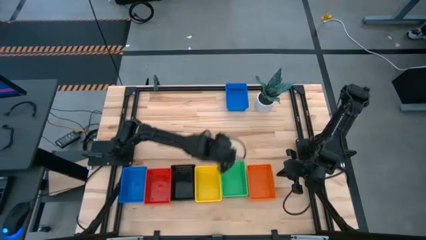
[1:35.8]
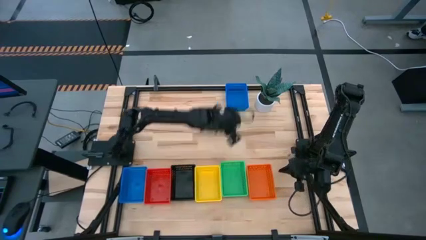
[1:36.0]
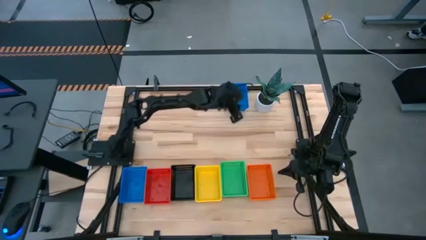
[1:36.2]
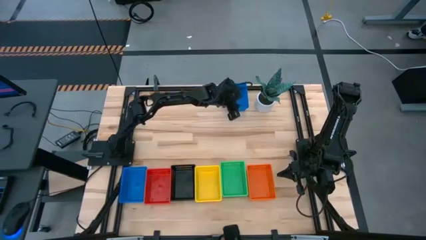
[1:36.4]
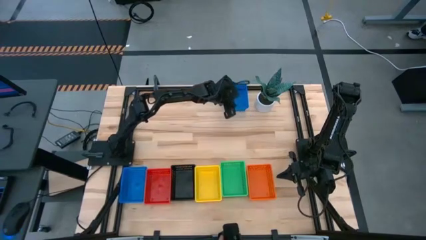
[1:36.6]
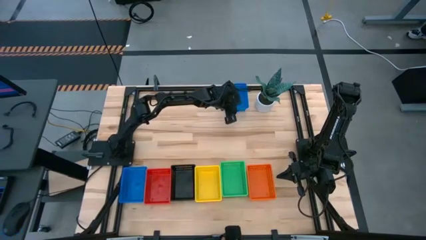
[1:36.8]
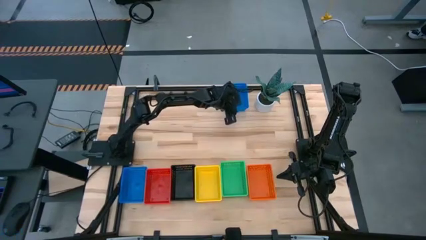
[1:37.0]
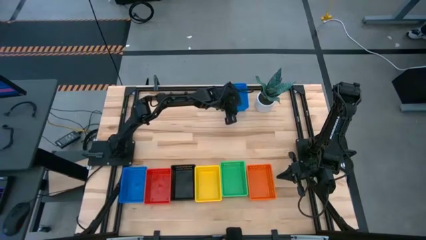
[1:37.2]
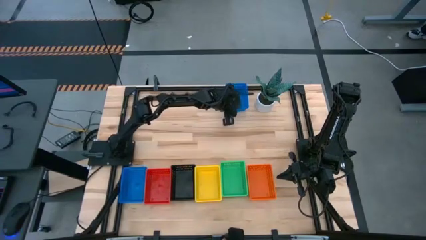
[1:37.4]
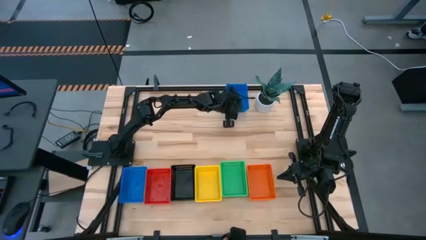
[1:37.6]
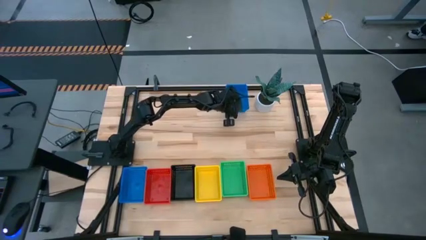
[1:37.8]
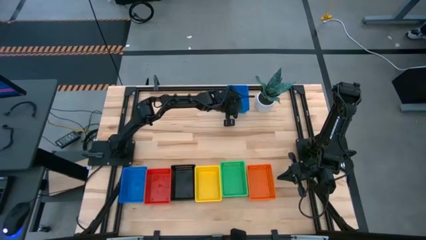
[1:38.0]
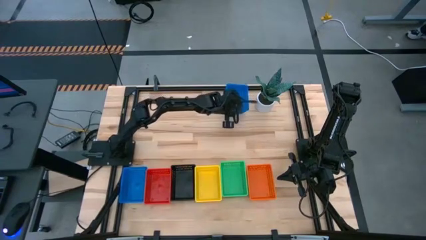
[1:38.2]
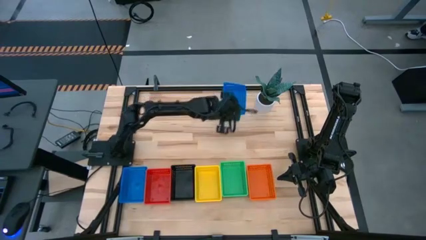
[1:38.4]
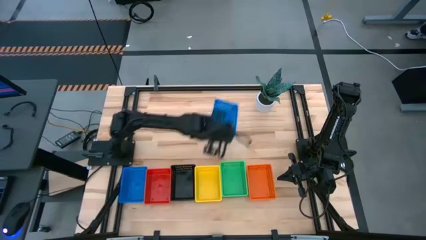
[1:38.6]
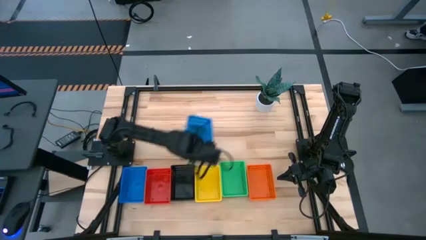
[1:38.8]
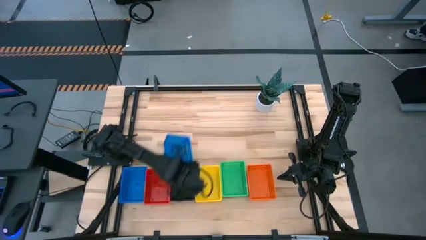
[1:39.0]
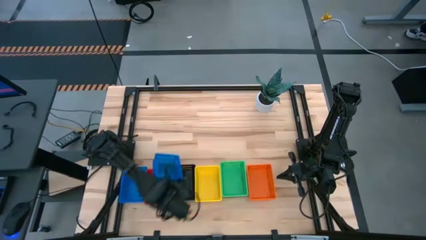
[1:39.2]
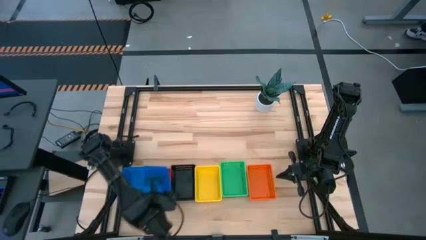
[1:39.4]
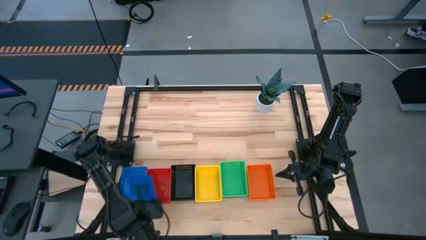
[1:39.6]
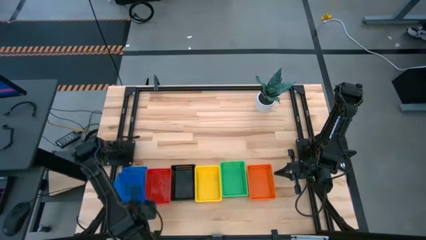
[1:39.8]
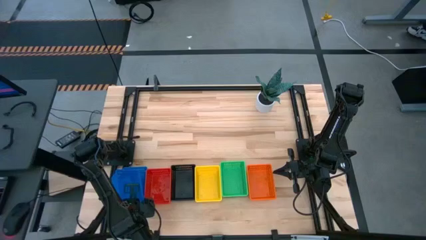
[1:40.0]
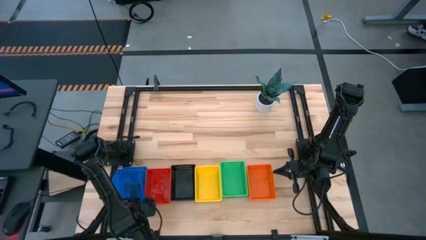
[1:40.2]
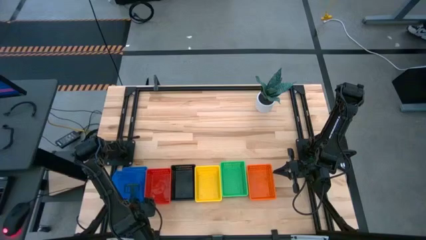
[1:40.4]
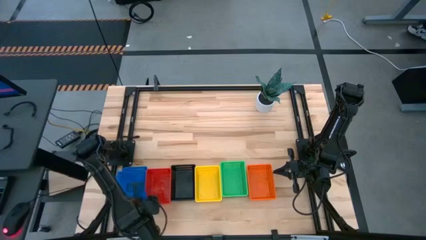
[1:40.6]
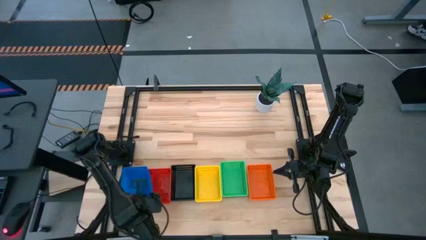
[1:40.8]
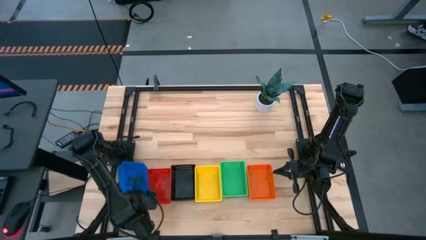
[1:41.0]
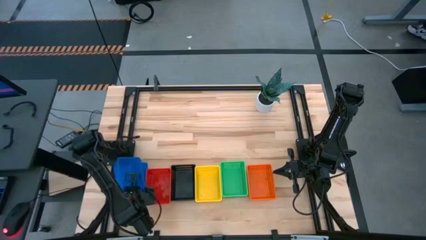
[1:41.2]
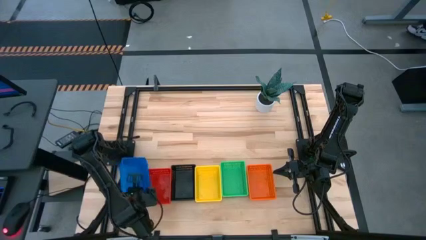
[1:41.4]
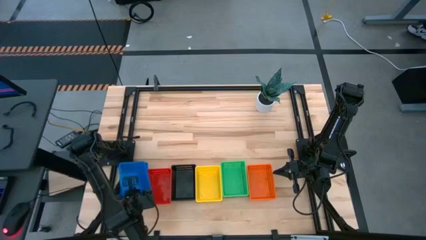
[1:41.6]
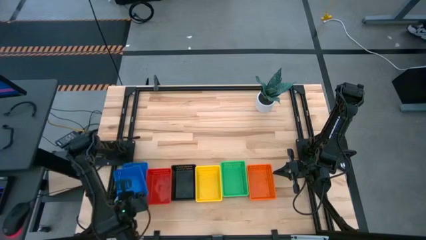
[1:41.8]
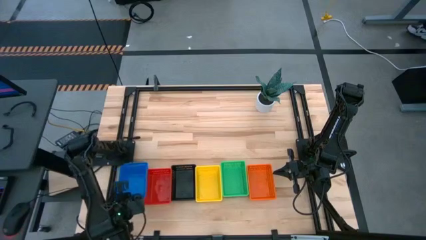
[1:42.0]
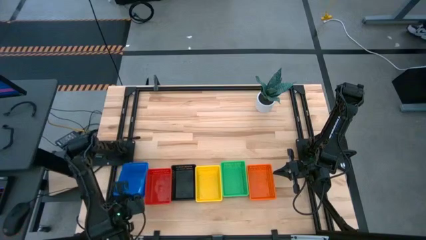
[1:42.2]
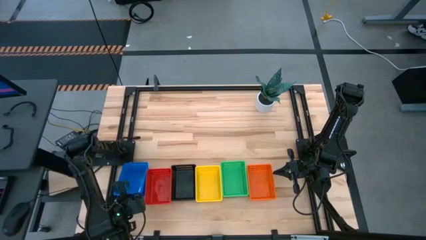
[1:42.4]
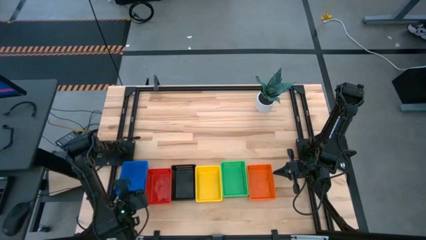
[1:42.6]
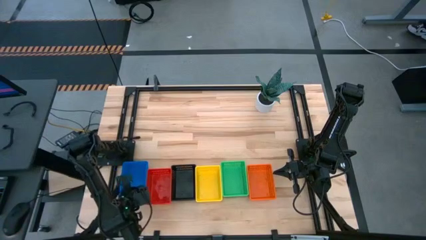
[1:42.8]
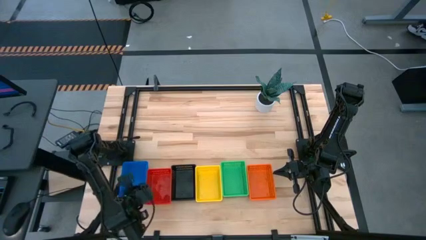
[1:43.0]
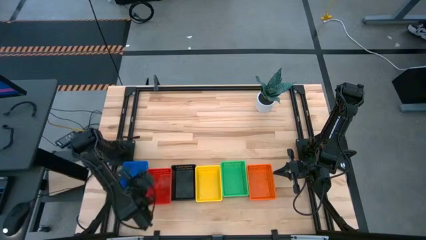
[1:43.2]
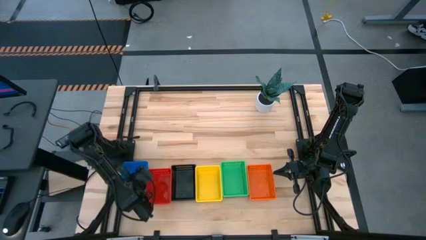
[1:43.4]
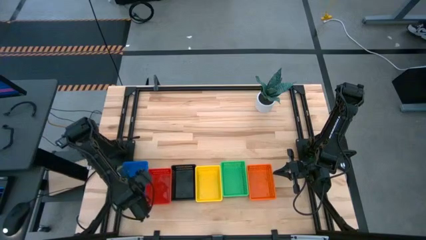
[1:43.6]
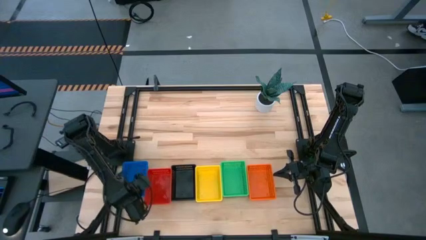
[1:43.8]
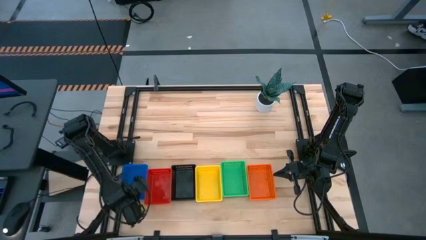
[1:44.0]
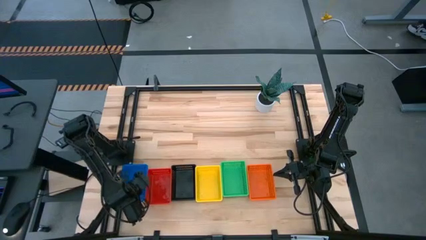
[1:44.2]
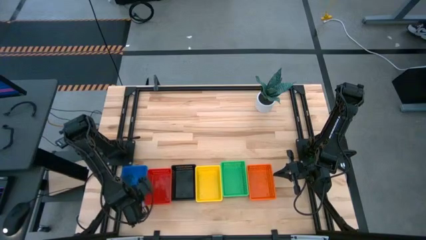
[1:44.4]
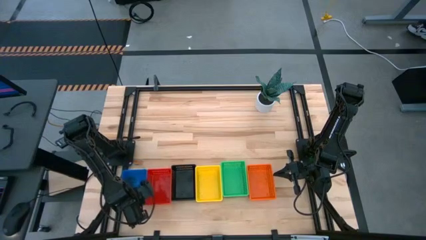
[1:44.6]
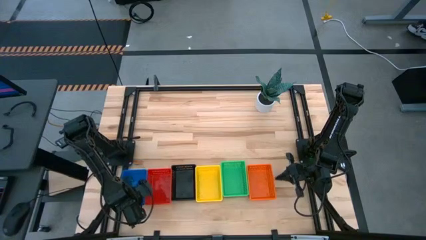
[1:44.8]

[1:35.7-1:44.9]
Stack the top blue bin on top of the left blue bin

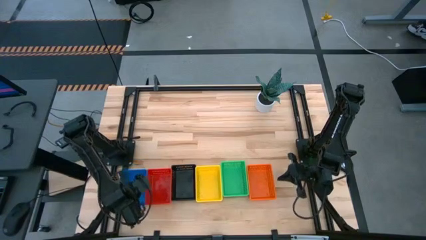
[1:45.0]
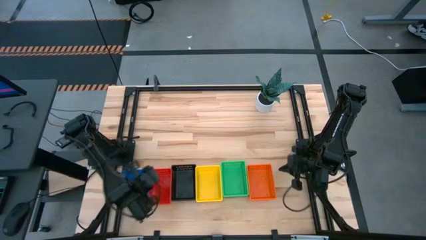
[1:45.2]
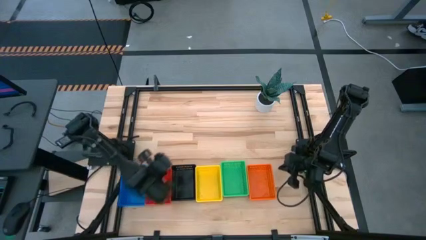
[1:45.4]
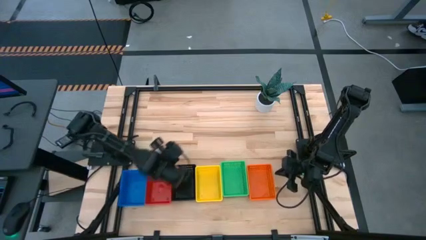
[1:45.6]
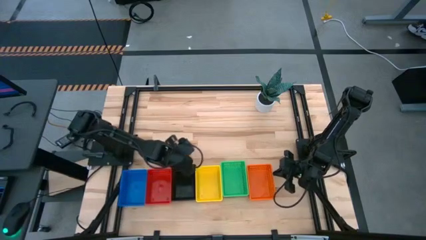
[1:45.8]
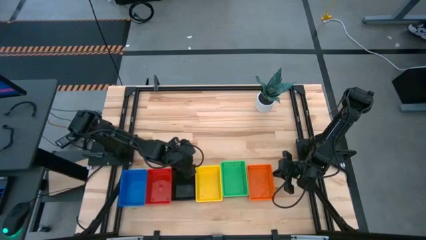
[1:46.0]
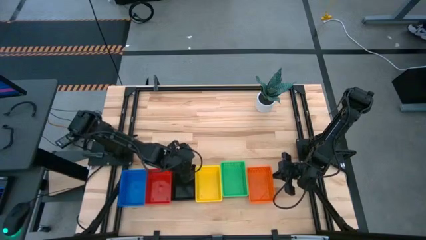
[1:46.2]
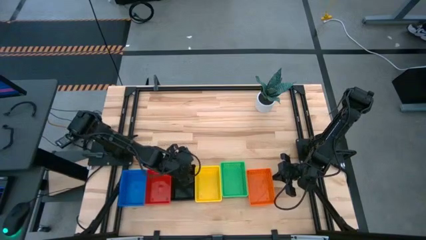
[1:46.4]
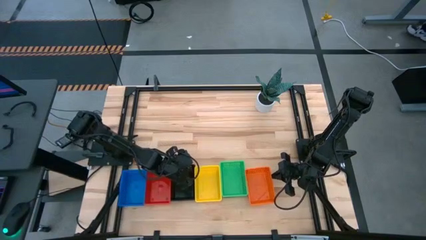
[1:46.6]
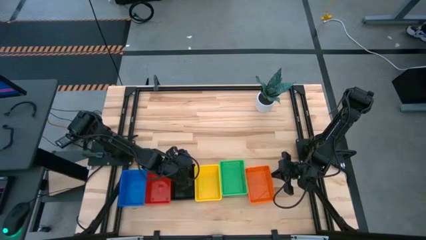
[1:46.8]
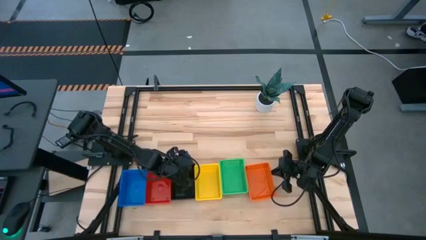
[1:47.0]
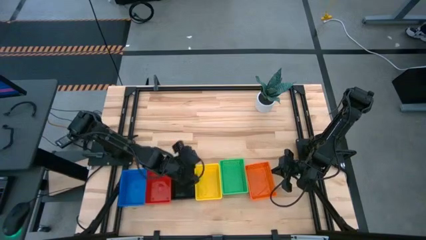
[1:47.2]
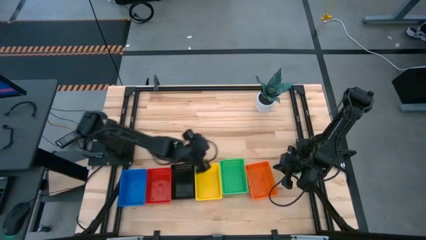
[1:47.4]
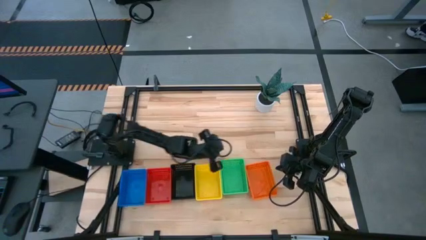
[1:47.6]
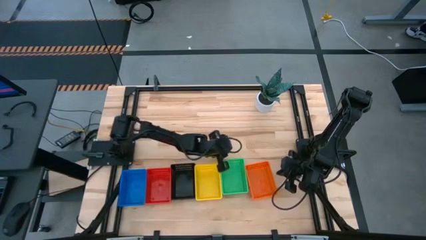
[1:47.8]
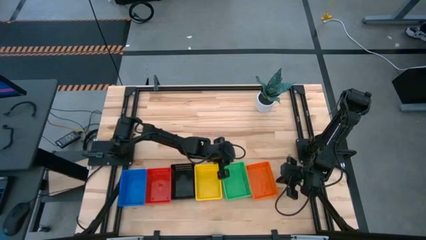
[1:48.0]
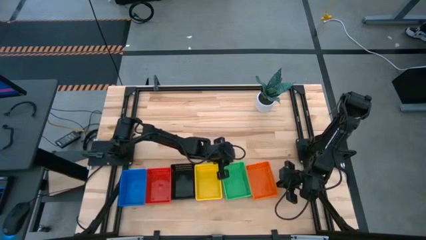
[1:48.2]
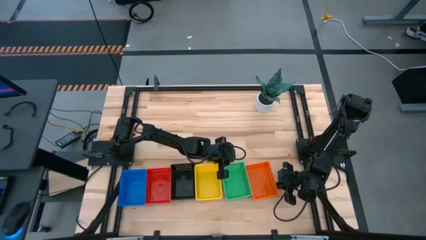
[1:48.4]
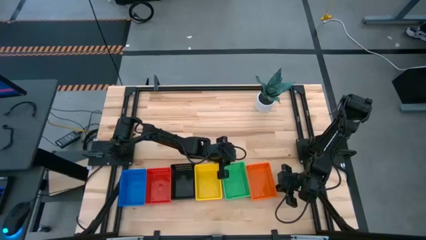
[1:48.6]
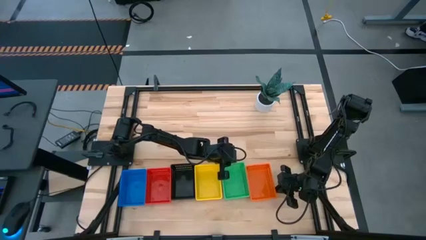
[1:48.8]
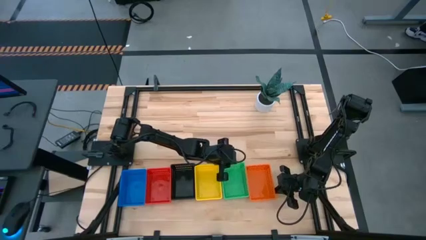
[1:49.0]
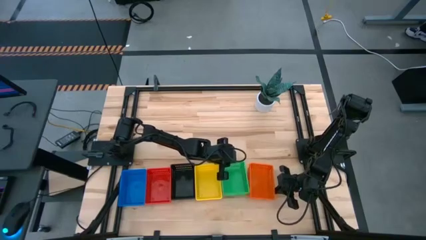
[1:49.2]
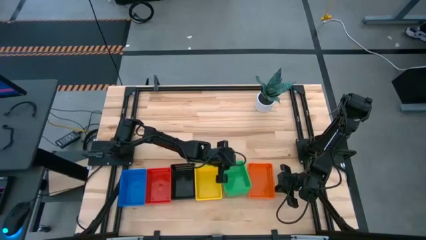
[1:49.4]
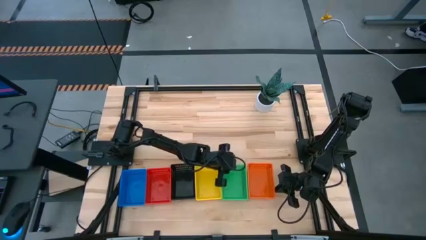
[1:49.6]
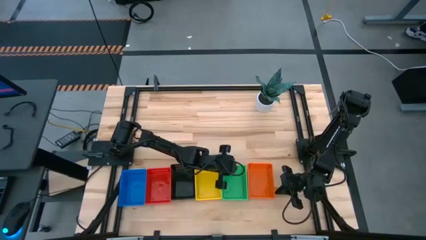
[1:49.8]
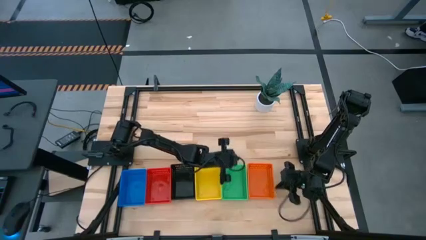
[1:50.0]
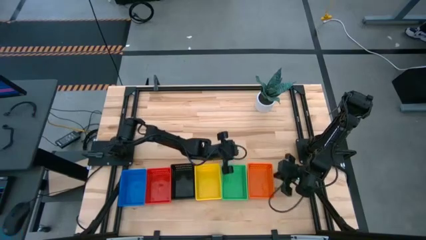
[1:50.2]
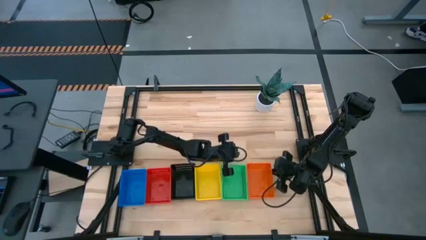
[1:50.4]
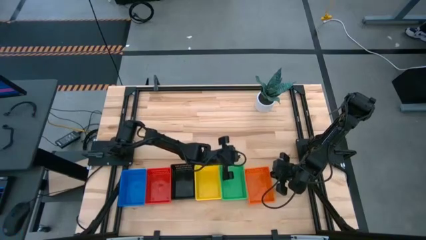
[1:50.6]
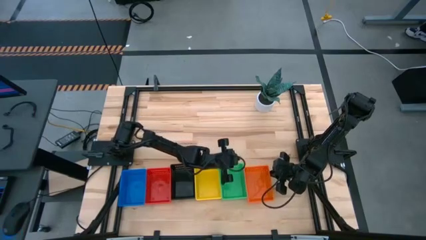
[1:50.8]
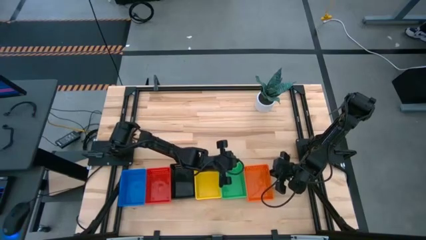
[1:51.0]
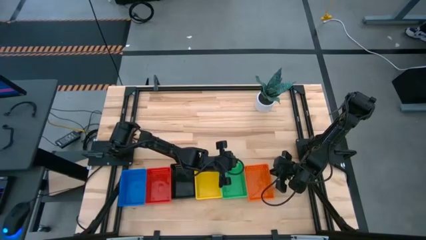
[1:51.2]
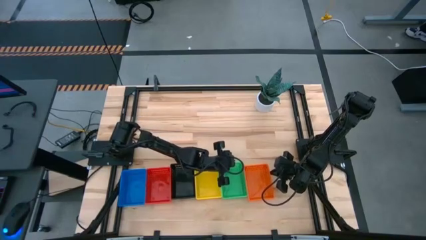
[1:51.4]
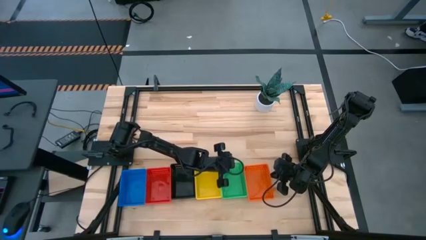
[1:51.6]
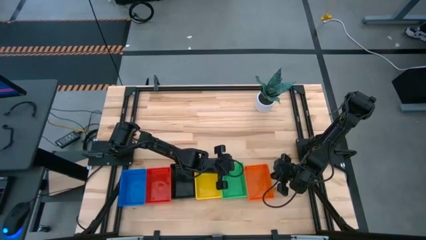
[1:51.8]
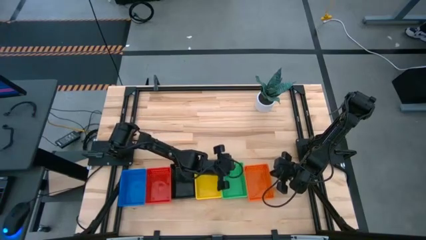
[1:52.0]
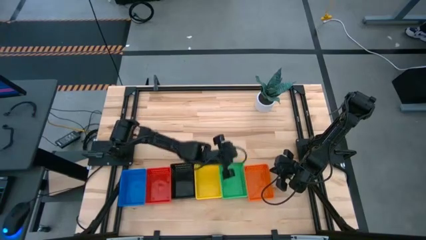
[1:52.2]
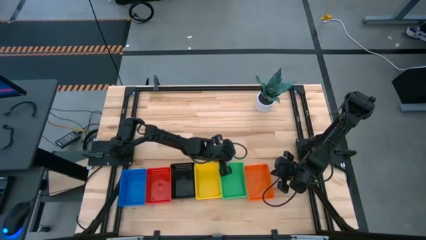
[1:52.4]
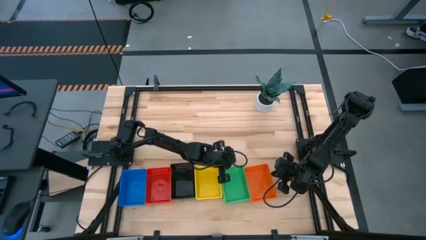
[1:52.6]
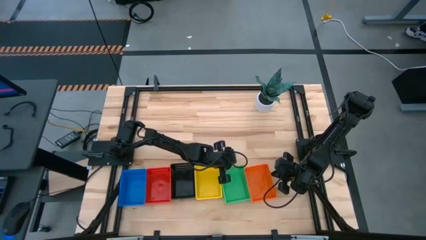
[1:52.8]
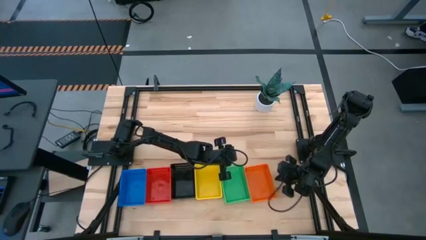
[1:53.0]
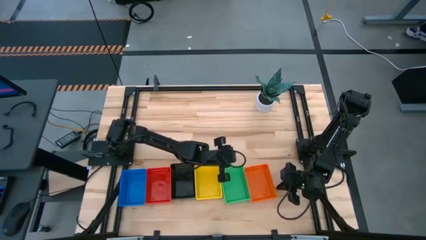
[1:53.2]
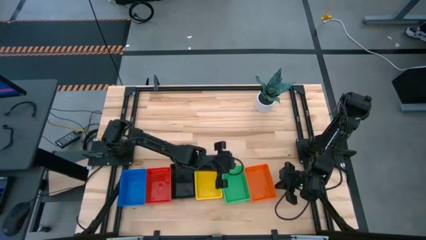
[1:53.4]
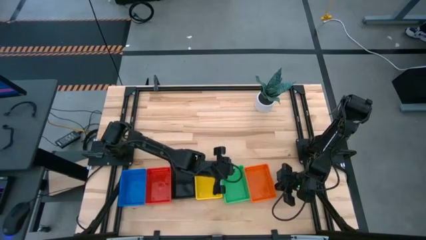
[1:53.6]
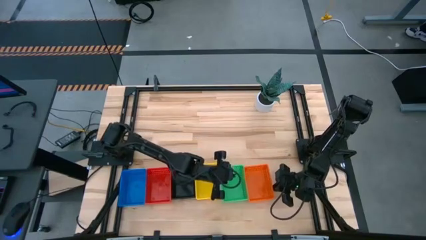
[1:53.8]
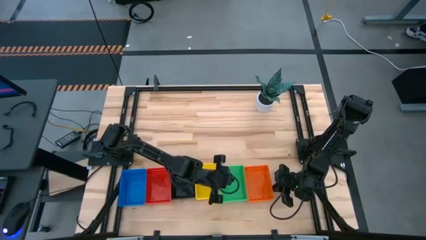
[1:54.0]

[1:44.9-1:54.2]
Adjust the colored bins
